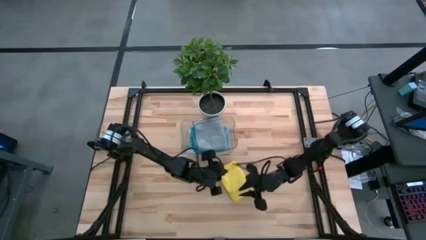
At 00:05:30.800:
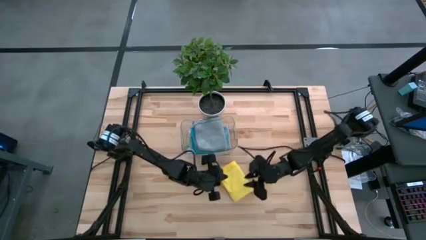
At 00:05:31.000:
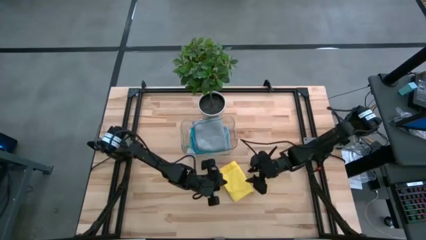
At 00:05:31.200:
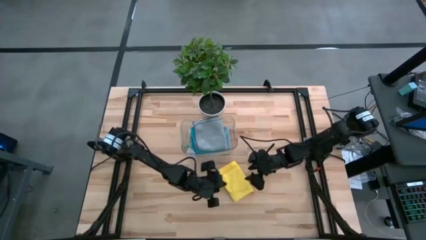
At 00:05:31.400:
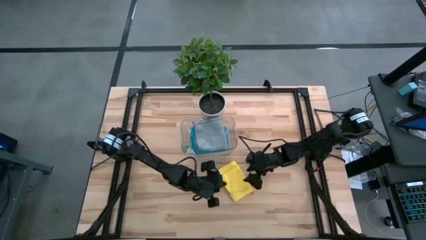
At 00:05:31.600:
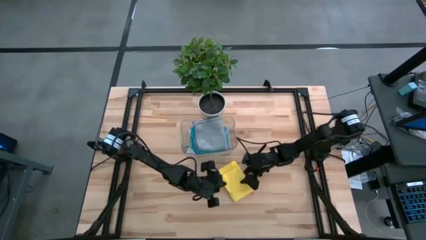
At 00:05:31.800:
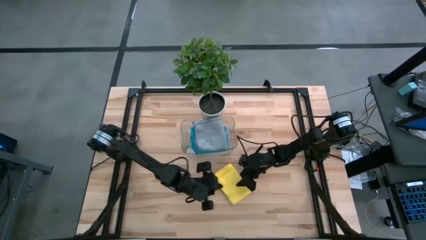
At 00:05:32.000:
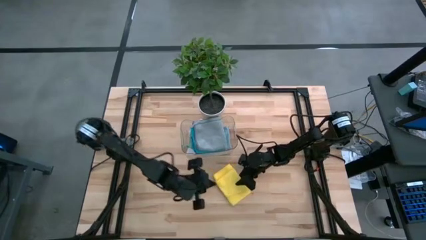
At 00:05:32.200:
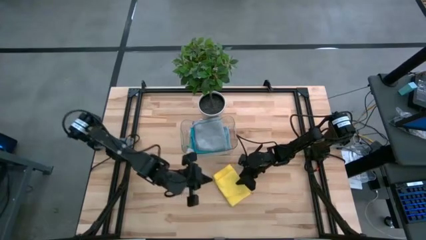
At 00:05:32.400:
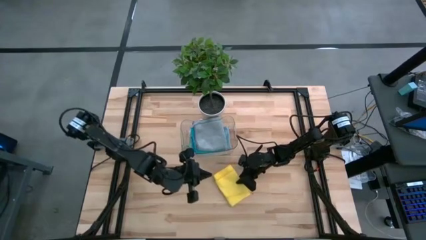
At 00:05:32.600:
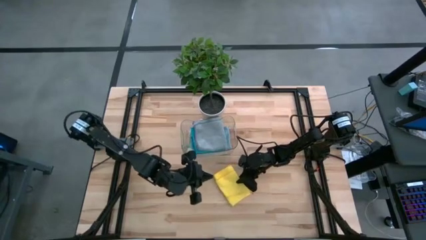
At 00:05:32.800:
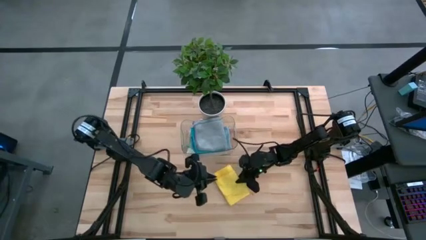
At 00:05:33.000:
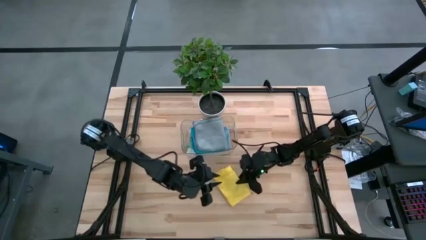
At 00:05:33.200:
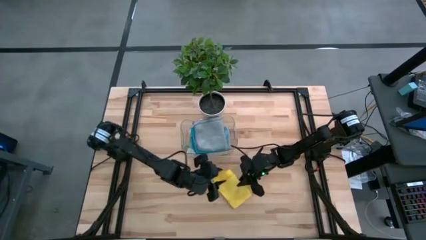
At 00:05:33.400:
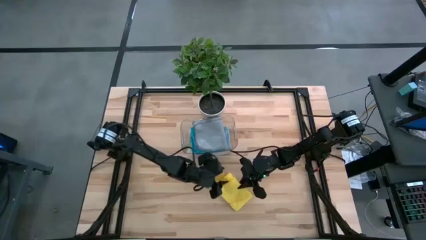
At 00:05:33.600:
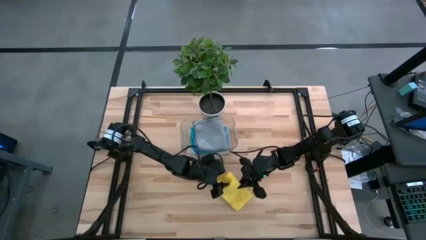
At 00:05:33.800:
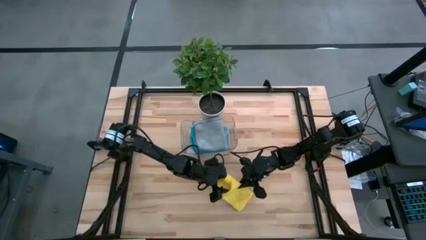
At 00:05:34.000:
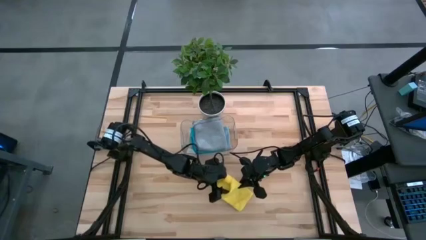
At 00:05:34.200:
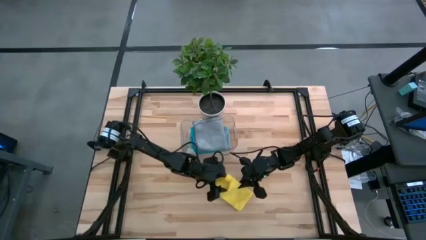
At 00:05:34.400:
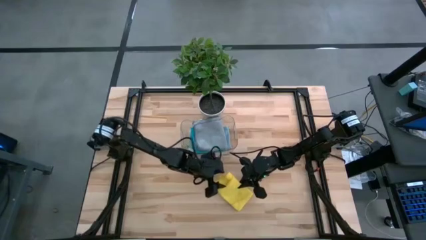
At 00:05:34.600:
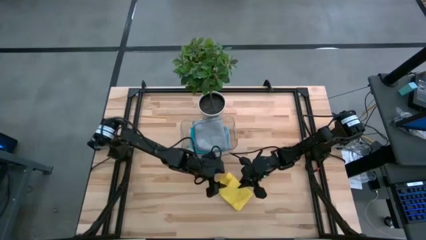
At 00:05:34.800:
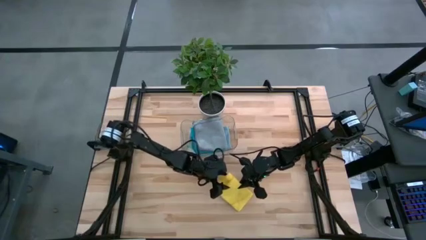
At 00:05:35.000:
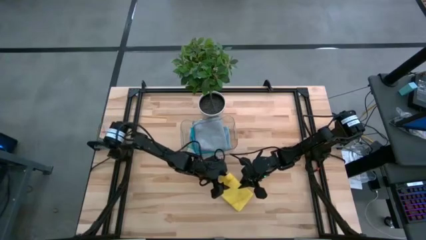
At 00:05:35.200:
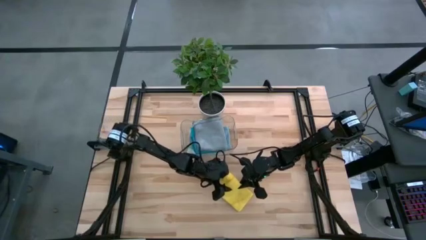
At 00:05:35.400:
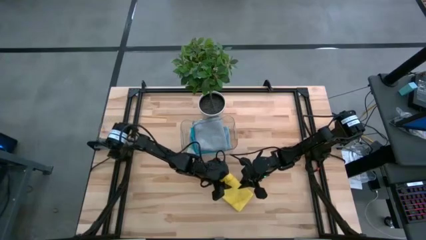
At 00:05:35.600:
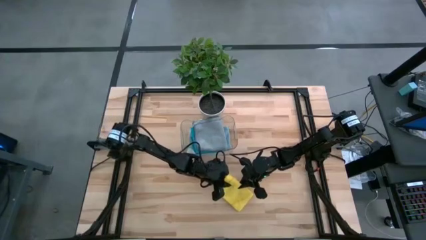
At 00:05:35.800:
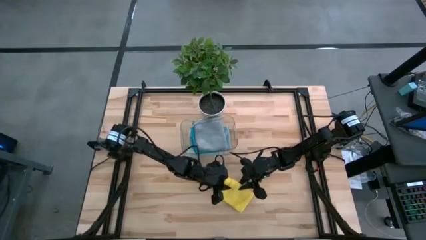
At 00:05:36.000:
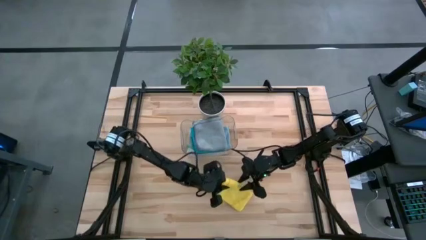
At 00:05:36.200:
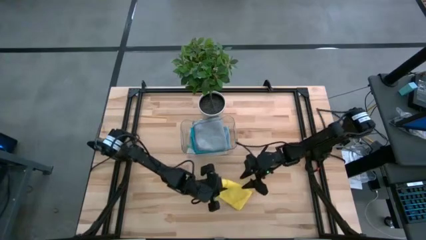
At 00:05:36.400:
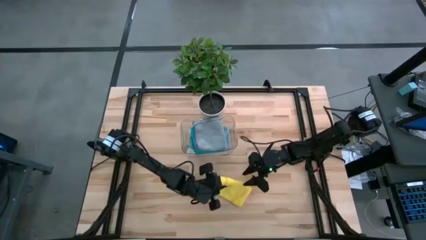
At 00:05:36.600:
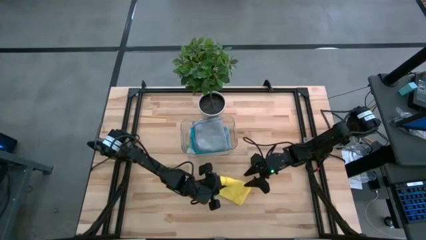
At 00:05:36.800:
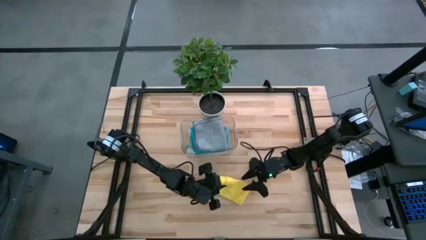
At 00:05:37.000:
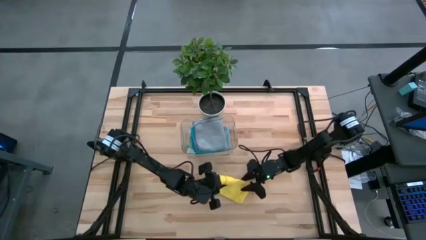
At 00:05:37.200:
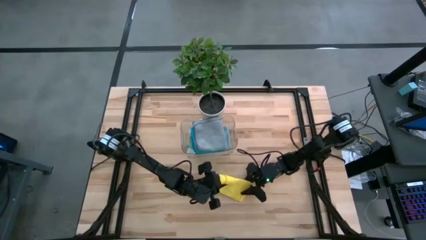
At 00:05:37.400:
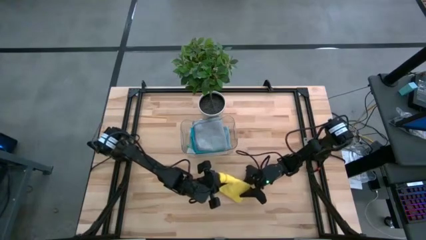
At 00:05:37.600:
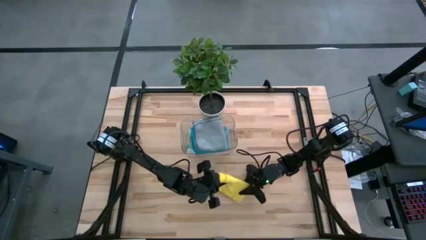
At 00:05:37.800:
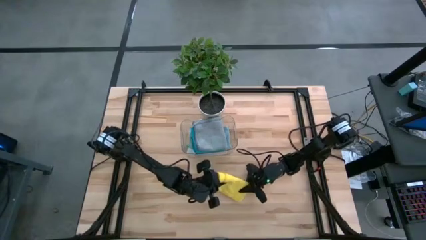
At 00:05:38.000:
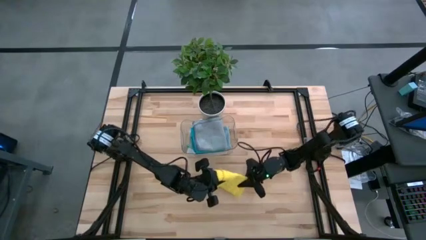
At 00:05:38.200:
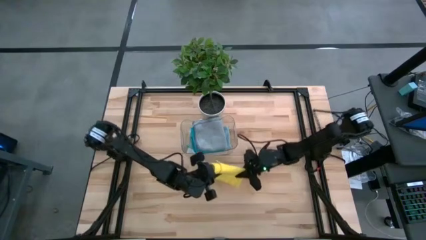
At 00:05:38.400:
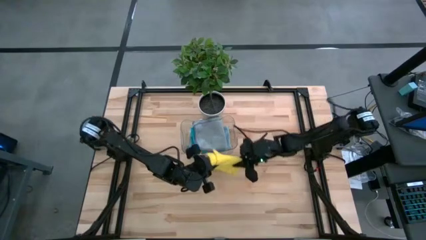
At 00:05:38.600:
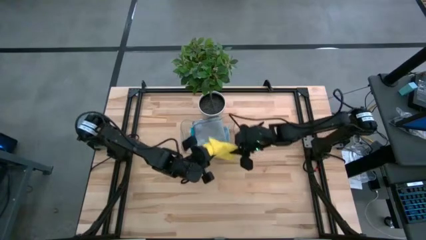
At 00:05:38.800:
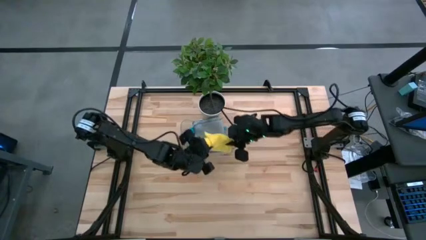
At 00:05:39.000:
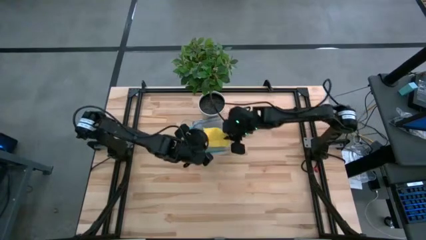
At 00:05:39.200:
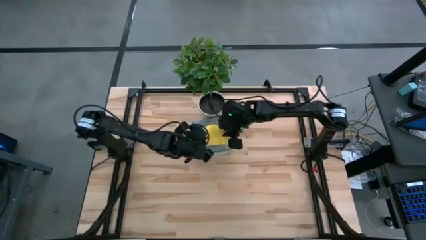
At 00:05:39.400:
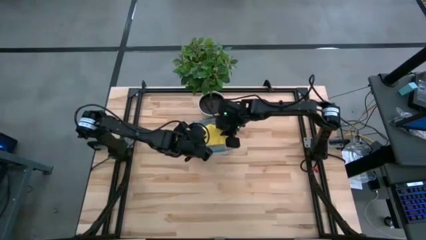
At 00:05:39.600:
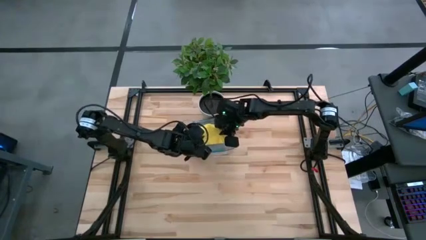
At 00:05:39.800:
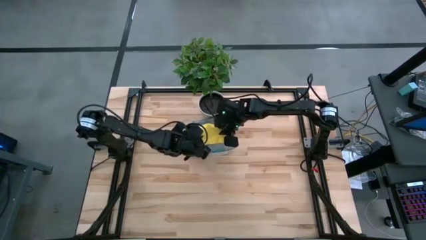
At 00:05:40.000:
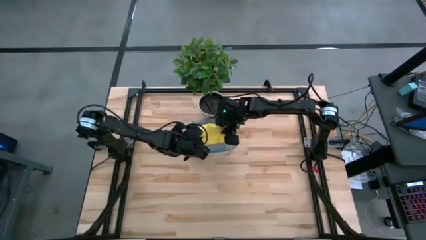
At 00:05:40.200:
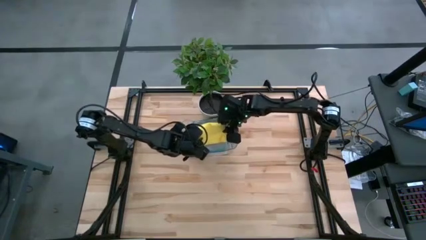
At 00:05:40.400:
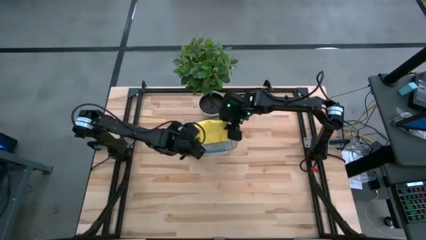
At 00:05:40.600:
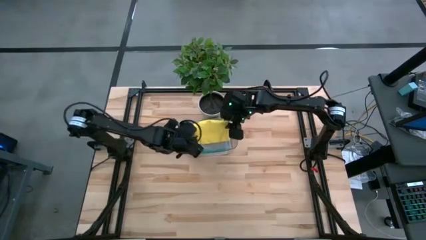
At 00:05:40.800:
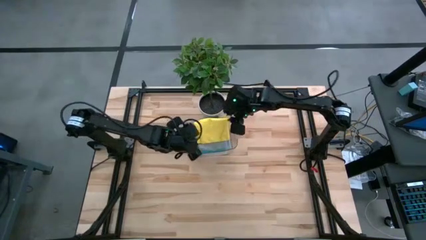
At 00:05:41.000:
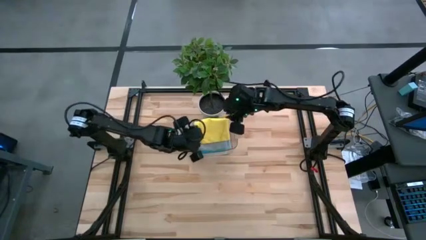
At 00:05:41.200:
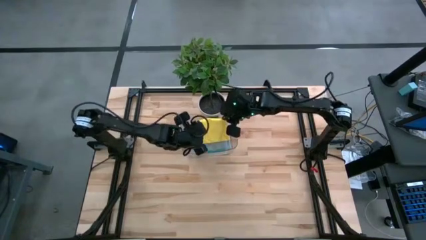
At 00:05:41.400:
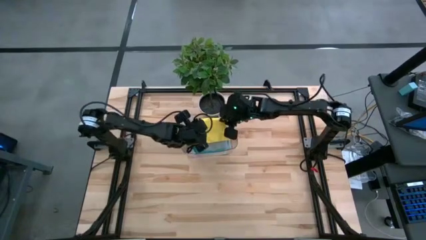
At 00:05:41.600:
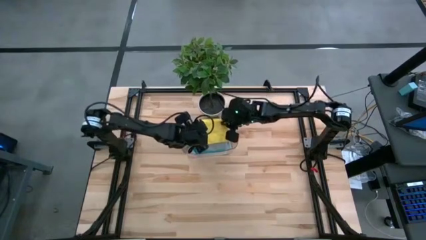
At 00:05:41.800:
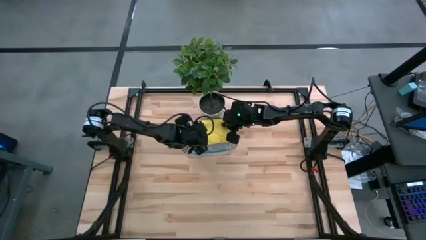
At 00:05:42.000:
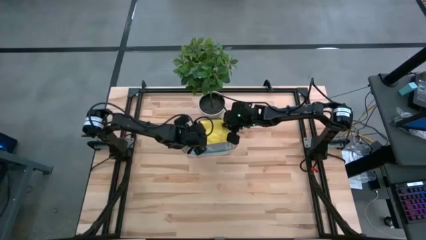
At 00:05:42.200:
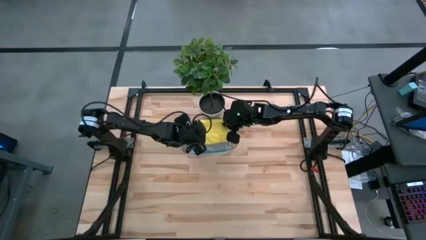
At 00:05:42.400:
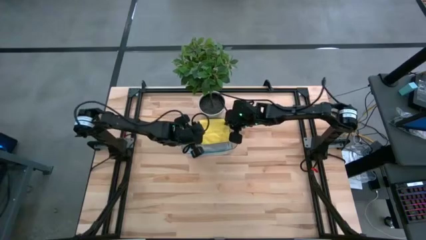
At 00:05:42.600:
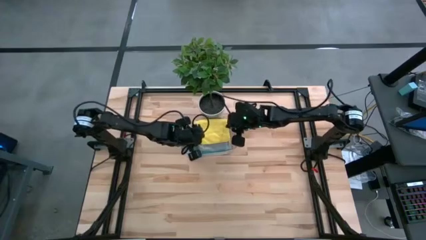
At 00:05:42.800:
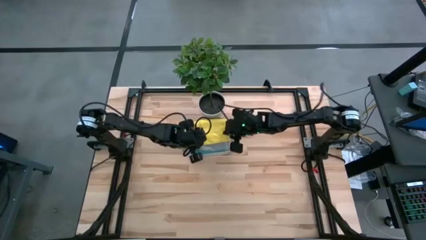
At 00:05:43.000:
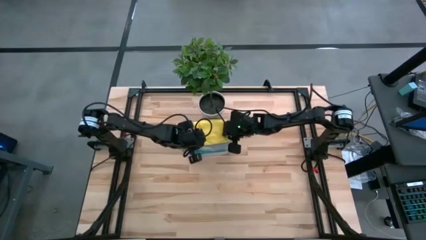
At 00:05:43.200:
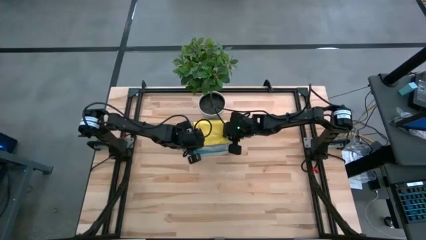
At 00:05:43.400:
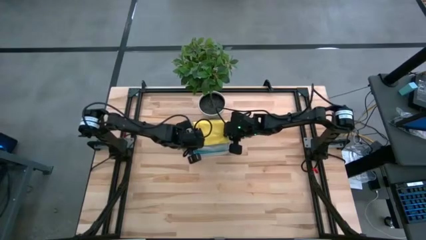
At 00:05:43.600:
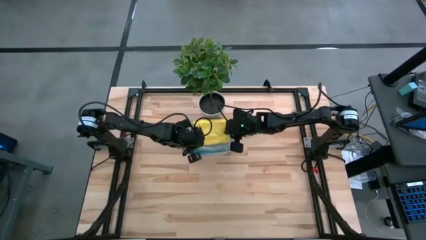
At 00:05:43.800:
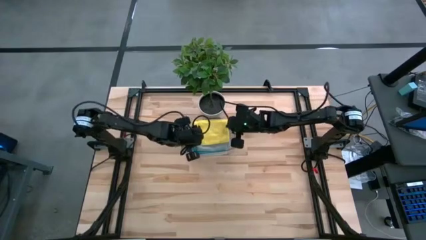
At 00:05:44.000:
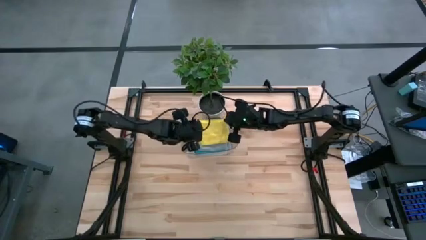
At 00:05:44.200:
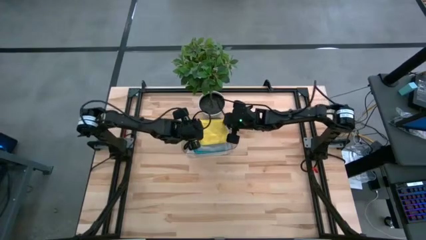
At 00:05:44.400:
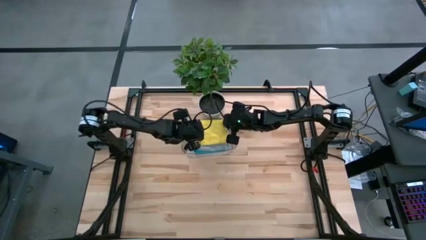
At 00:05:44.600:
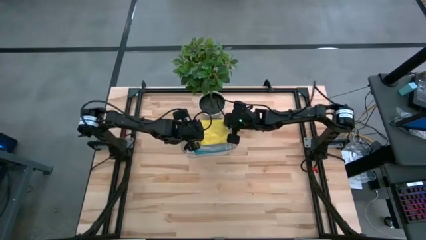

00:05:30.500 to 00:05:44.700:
Task: Fold microfiber towels
Stack the folded yellow microfiber cloth on top of the folded gray microfiber cloth
